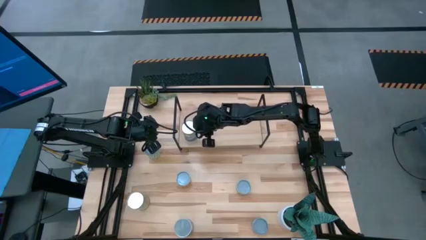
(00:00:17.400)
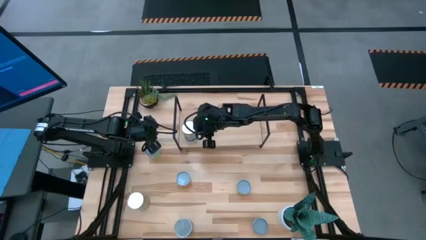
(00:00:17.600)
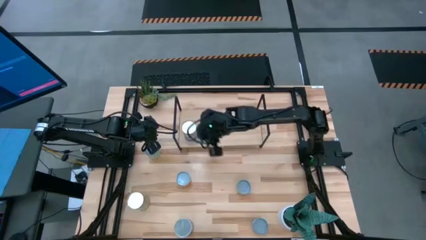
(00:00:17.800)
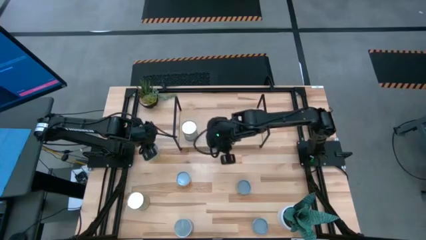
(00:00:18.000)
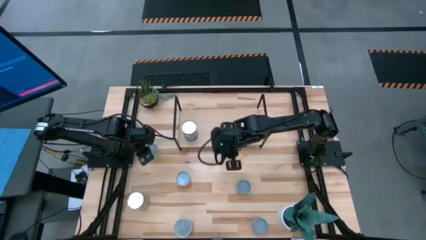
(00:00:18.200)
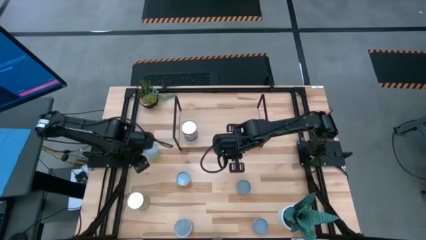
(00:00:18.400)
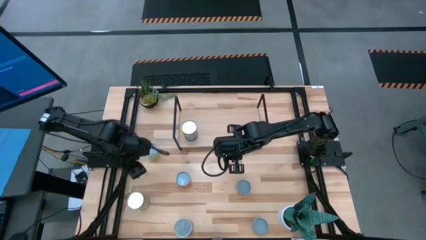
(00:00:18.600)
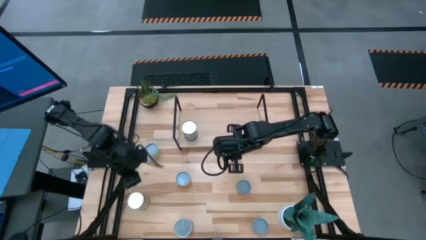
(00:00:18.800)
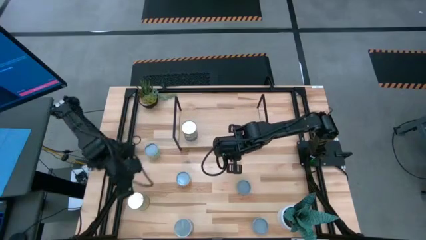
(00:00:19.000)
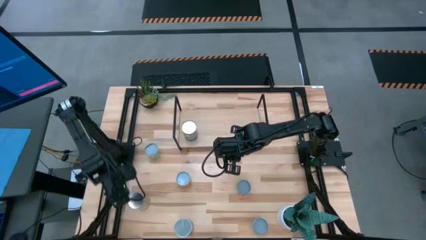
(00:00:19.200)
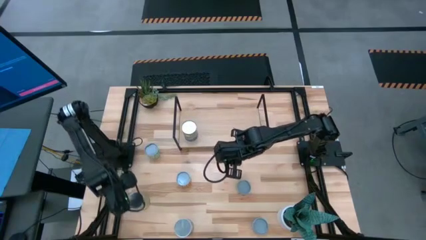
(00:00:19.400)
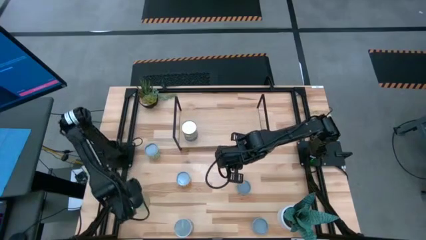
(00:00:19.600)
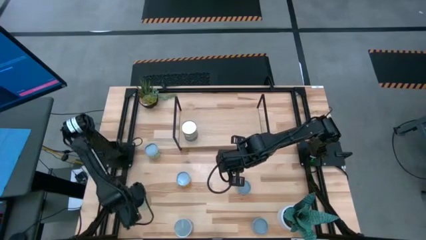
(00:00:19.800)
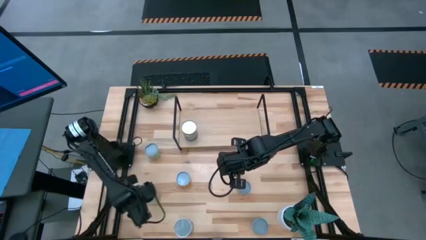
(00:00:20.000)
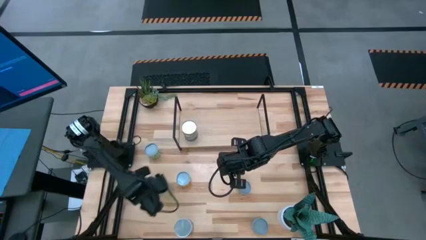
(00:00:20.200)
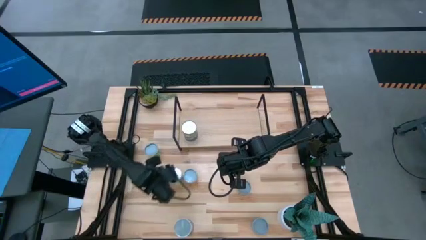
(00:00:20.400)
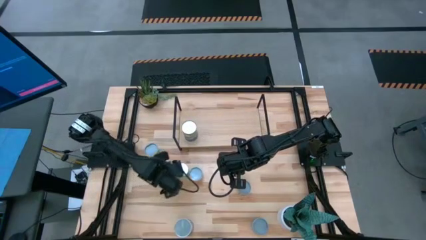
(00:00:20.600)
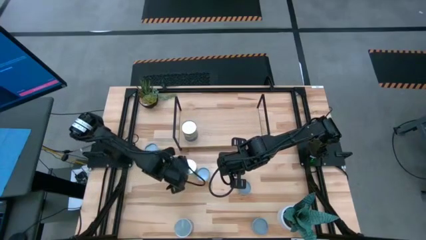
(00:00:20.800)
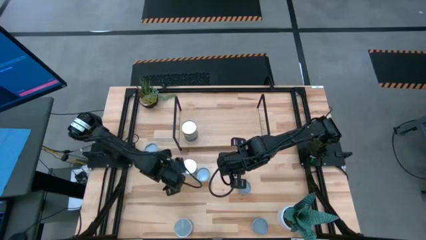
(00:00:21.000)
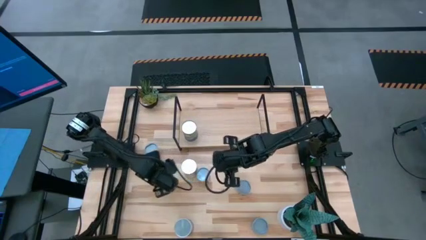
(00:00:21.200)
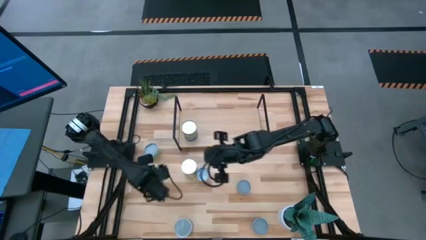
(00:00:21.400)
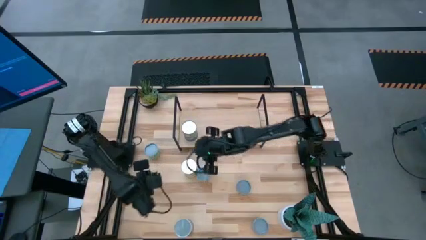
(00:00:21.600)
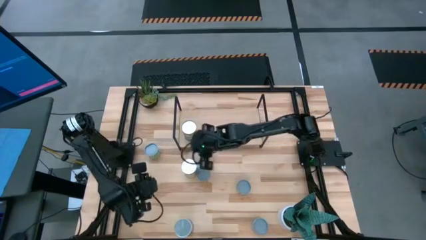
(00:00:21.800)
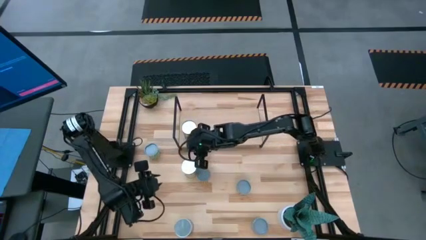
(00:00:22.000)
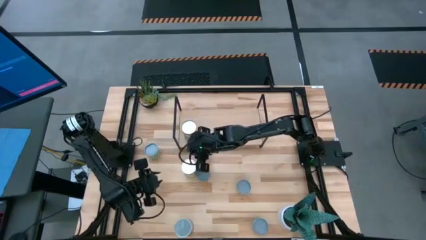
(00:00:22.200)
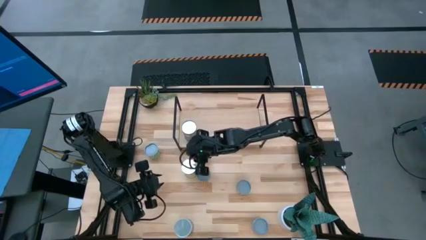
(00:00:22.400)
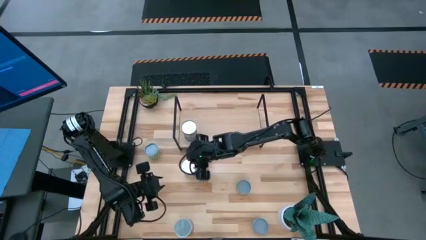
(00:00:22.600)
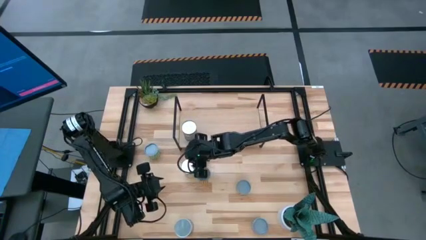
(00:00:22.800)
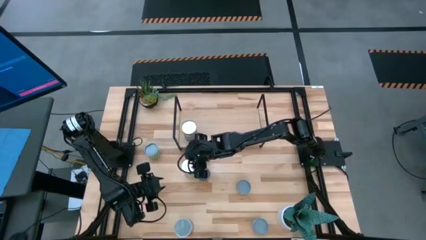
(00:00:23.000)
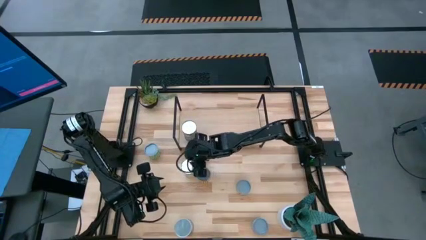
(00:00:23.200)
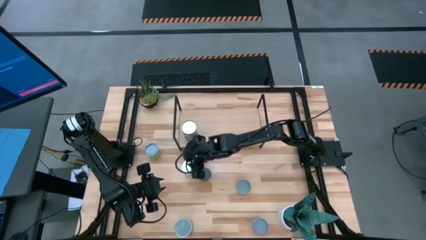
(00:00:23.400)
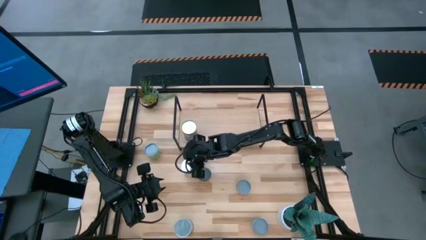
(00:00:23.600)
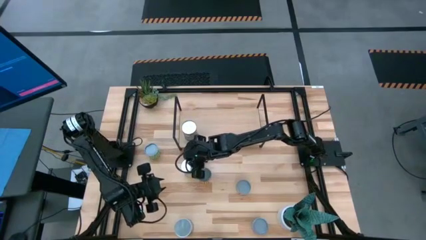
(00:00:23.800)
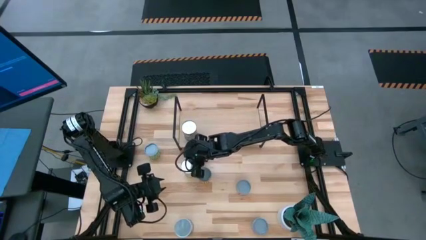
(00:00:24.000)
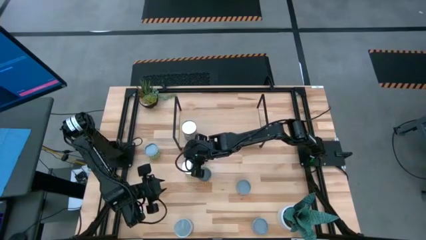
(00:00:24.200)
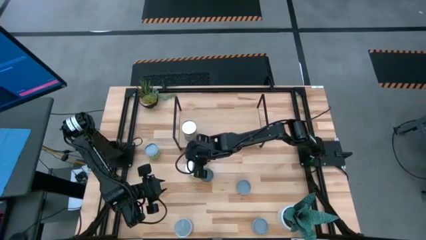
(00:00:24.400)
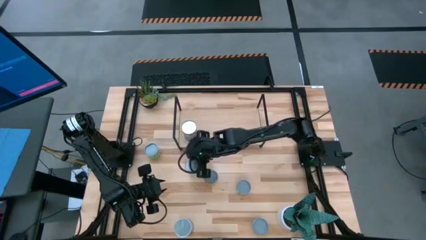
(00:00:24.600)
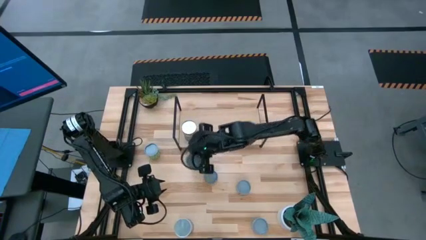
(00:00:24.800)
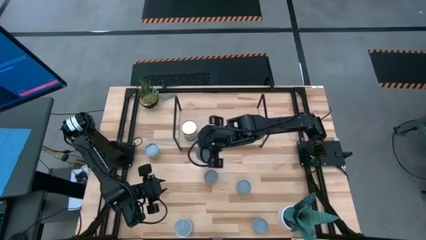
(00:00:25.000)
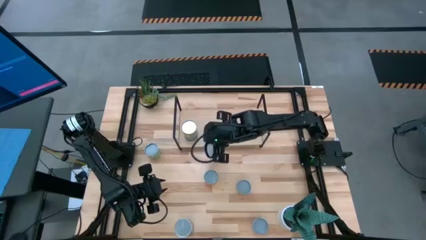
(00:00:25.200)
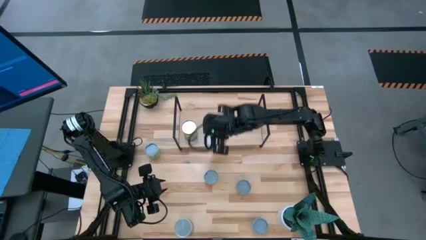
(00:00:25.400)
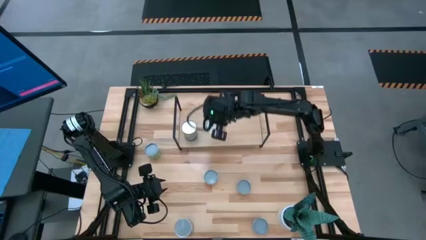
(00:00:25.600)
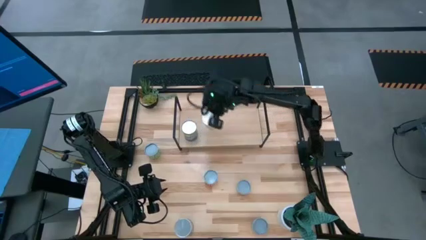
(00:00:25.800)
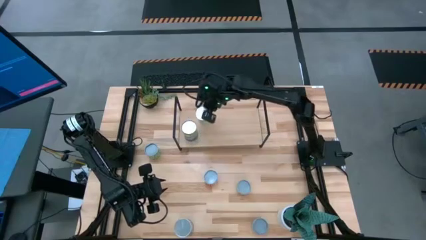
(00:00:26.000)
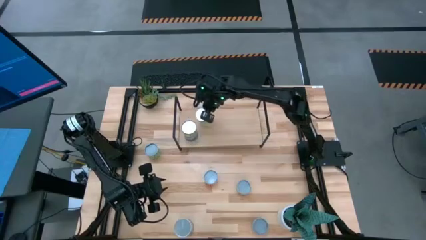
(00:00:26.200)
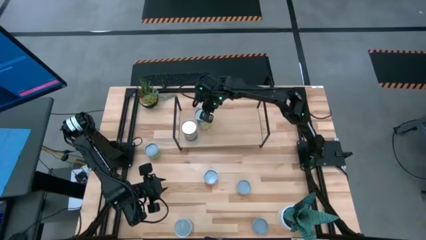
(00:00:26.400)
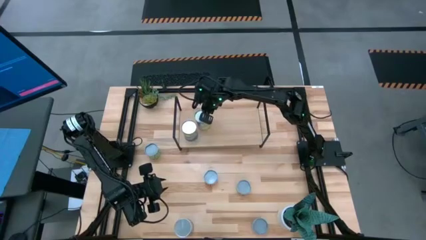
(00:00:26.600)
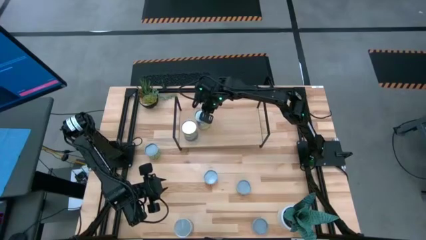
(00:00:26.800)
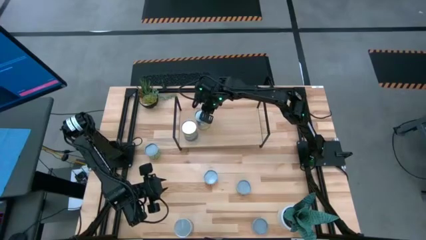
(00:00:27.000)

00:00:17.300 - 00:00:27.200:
Task: Pick and place cans onto a shelf
Put the canned carrots on the shelf

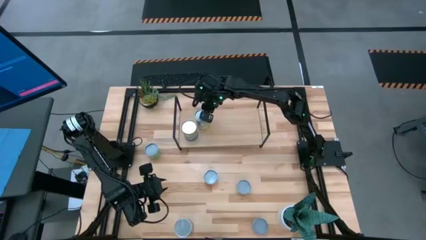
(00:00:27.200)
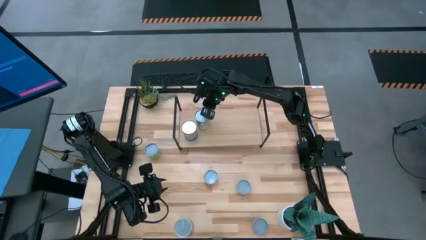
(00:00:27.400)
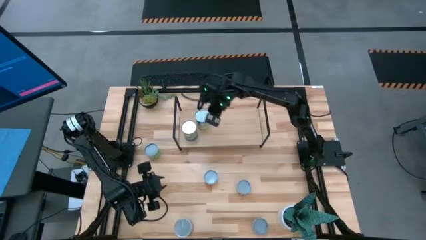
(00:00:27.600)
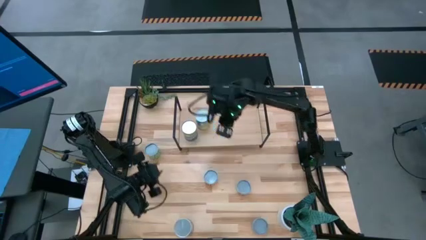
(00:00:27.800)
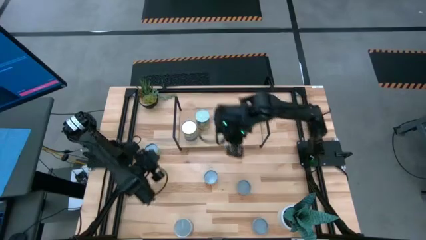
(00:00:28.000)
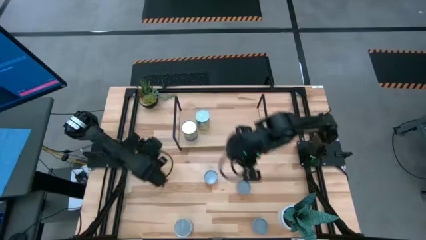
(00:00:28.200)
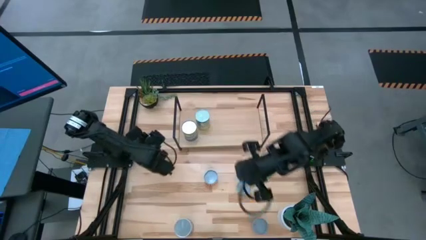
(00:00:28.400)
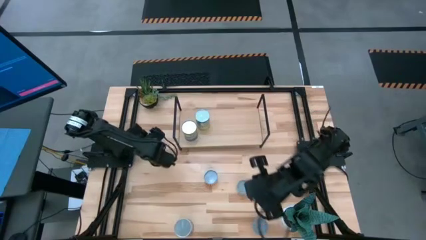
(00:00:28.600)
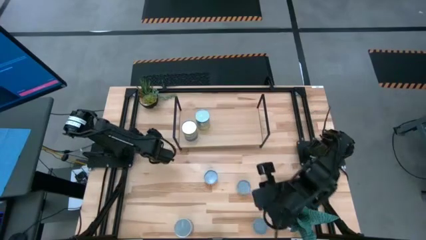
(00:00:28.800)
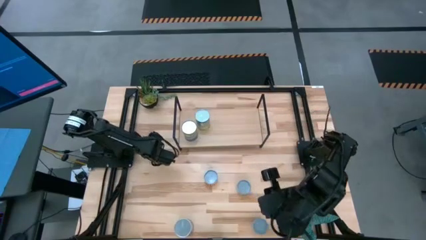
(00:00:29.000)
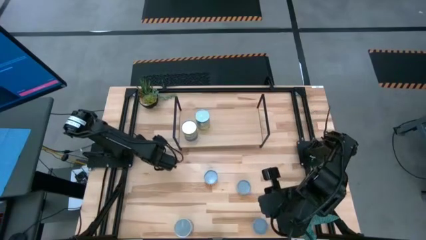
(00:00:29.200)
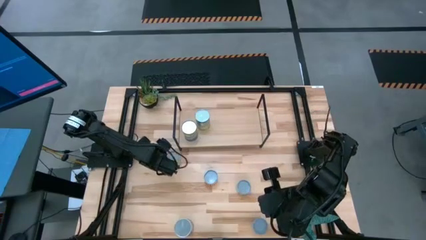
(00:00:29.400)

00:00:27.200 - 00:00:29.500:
Adjust the canned green peas

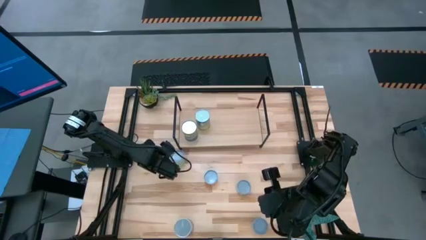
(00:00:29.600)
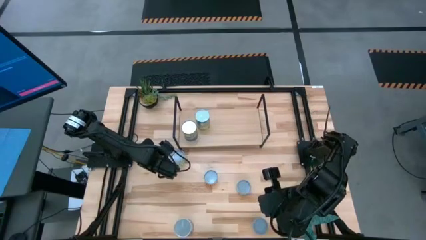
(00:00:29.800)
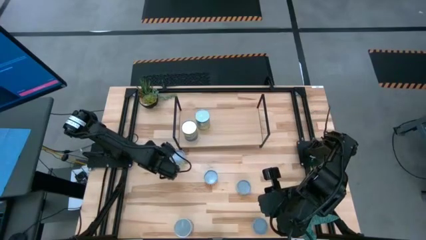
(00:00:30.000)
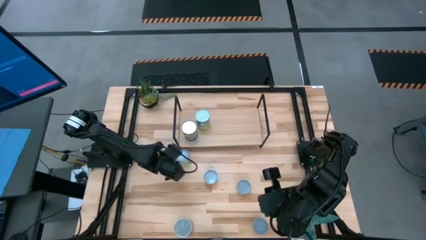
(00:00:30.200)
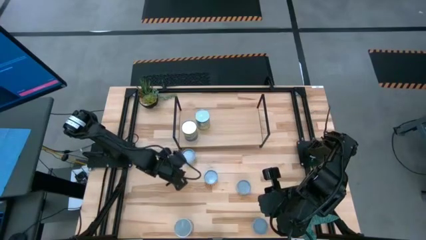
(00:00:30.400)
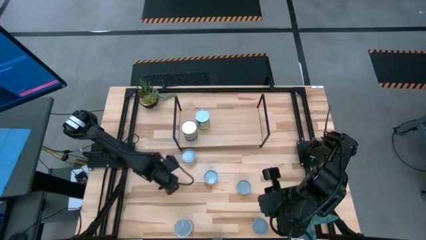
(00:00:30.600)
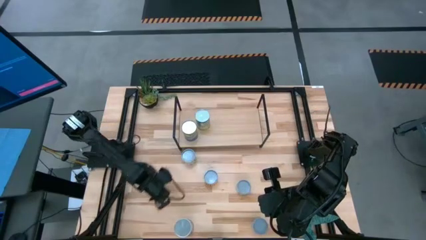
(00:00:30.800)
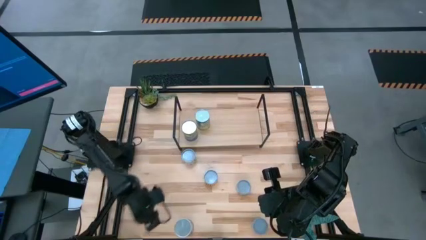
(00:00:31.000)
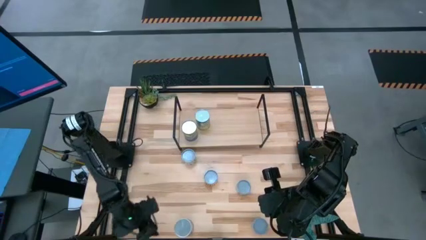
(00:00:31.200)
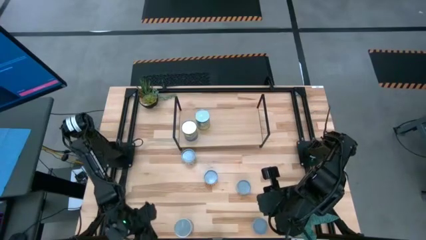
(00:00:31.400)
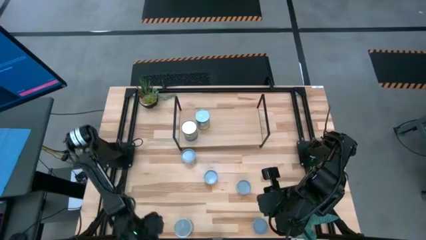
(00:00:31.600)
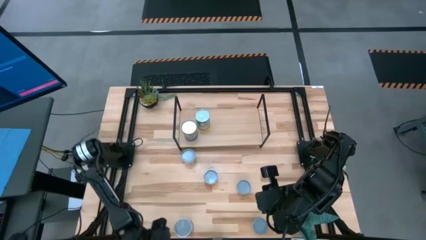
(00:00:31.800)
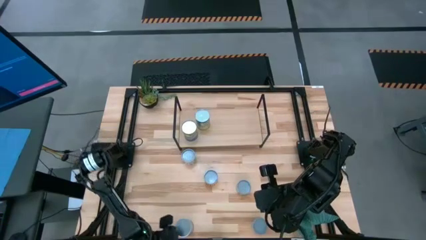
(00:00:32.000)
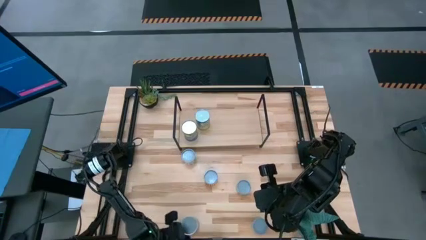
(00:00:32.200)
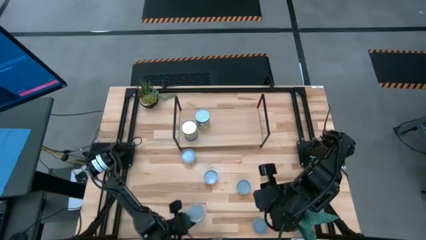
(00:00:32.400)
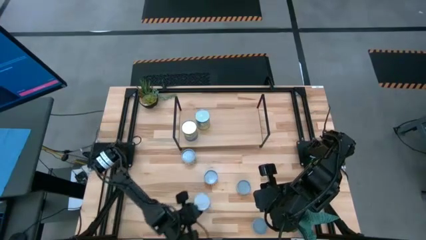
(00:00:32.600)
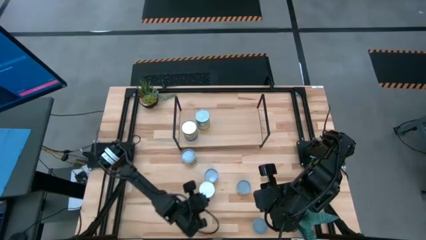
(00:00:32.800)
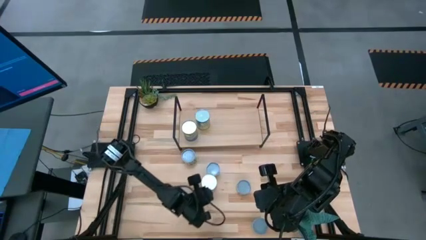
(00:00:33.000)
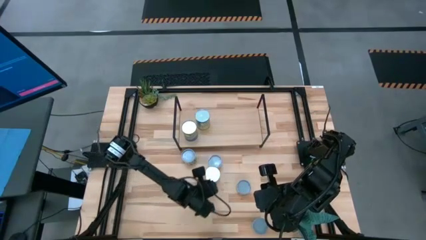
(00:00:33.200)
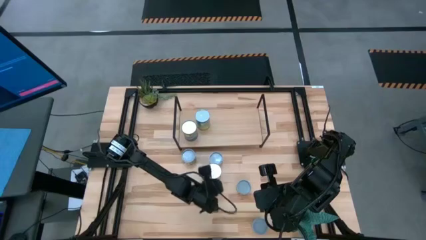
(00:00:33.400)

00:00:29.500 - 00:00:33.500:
Adjust the canned peaches

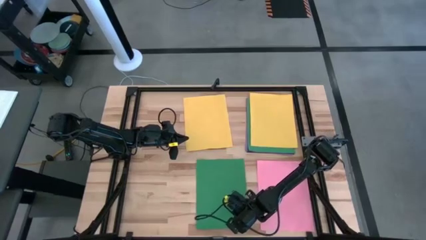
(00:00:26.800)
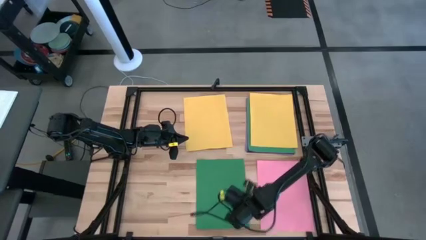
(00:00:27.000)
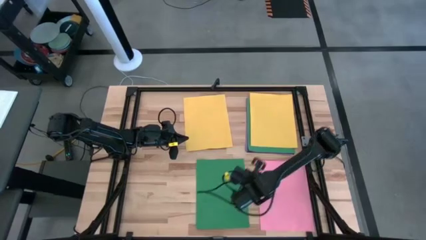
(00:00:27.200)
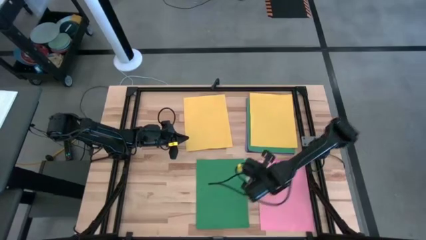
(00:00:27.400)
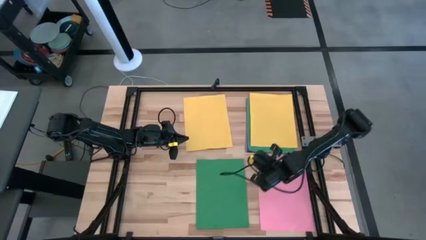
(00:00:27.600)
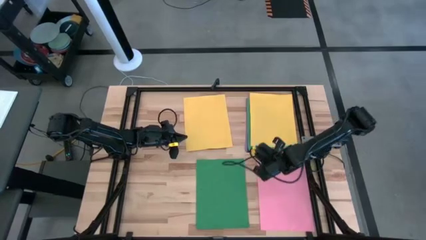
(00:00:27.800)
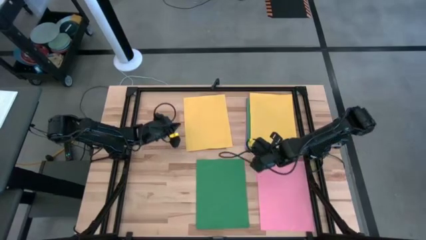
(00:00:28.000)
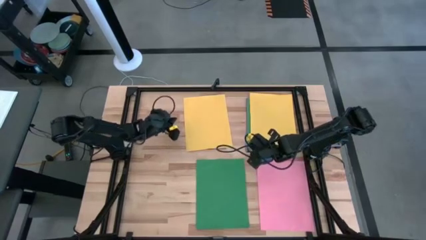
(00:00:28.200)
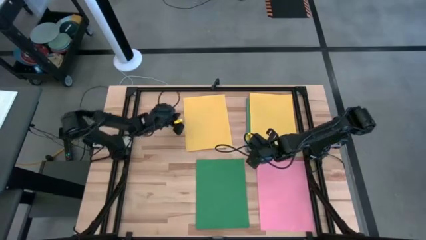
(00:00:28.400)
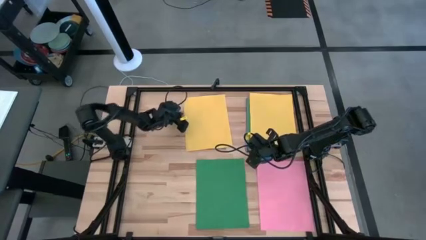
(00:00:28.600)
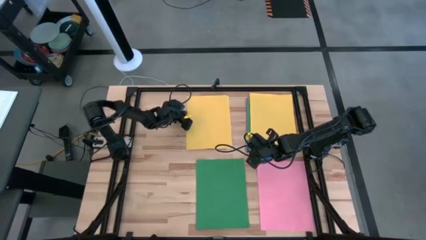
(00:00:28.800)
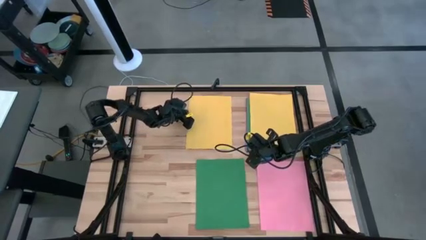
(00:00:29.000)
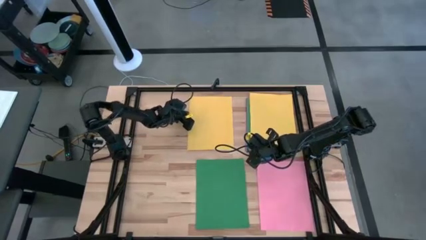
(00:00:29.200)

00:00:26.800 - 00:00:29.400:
Task: Organize paper
Adjust the yellow paper
